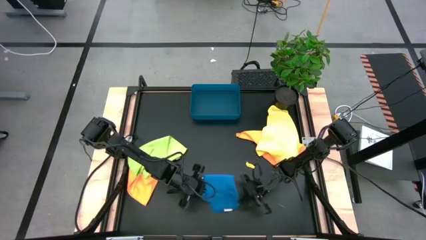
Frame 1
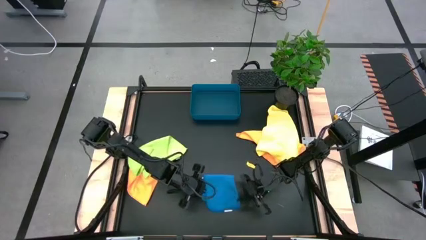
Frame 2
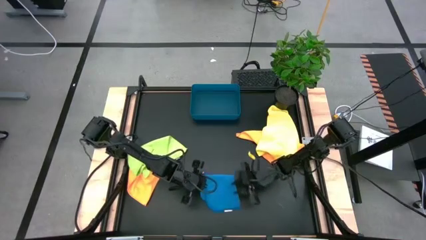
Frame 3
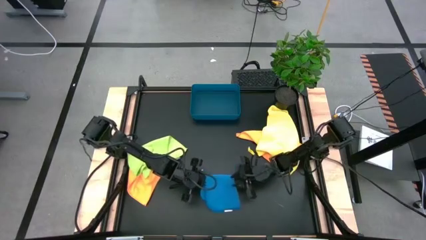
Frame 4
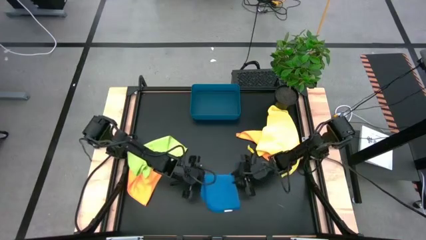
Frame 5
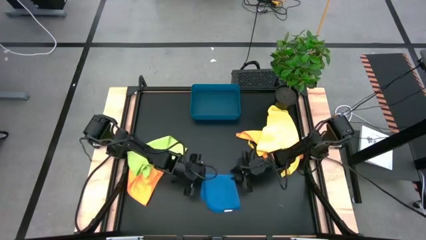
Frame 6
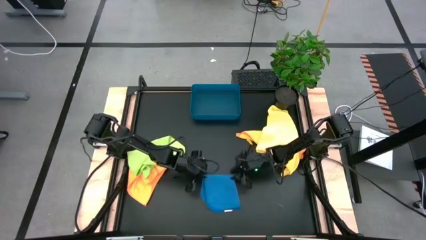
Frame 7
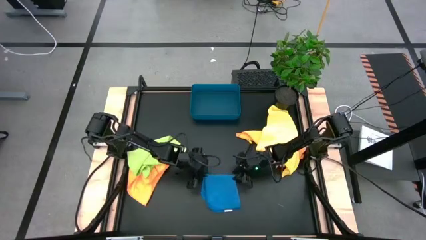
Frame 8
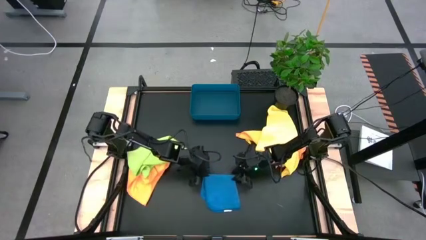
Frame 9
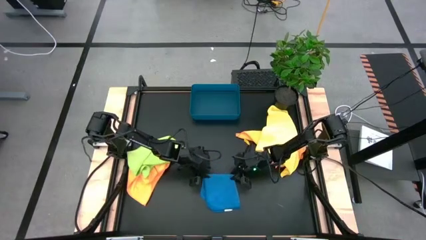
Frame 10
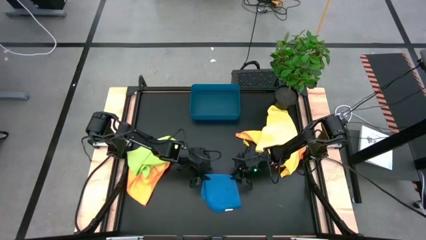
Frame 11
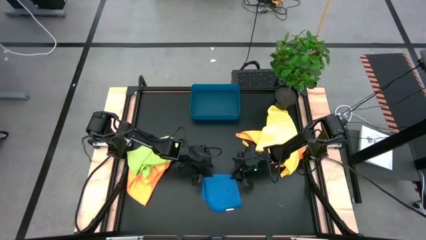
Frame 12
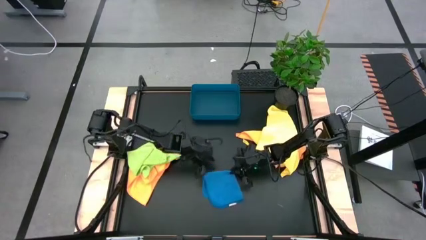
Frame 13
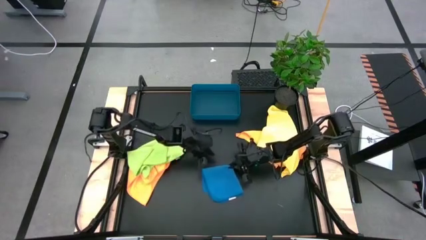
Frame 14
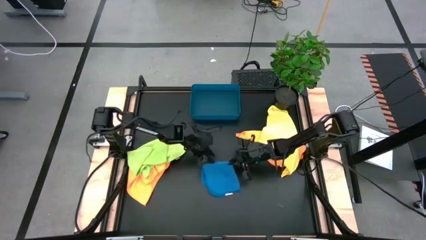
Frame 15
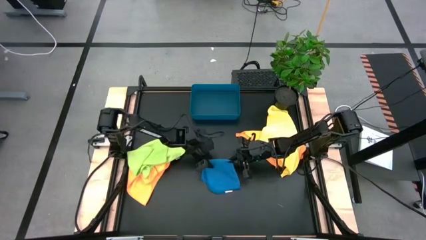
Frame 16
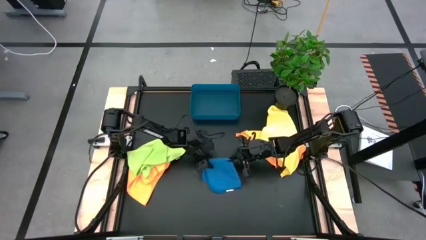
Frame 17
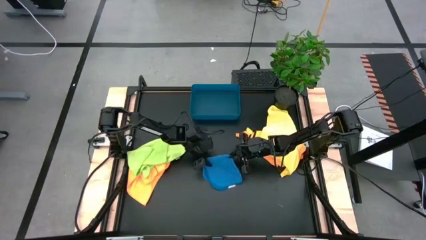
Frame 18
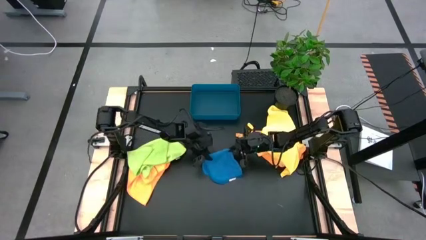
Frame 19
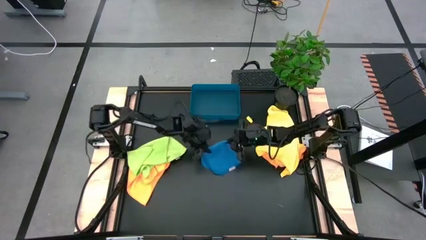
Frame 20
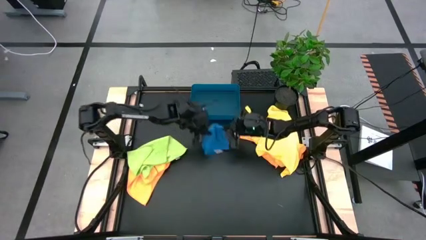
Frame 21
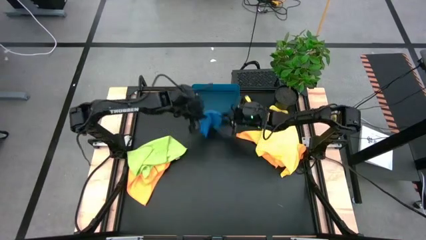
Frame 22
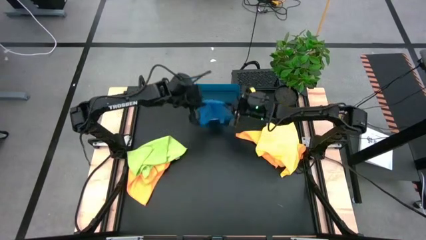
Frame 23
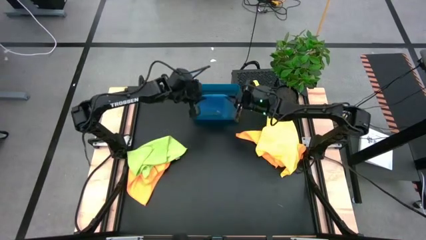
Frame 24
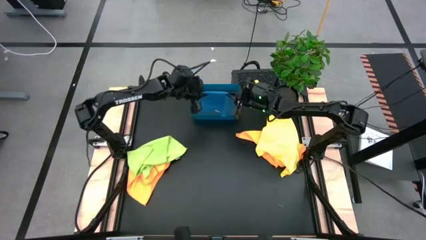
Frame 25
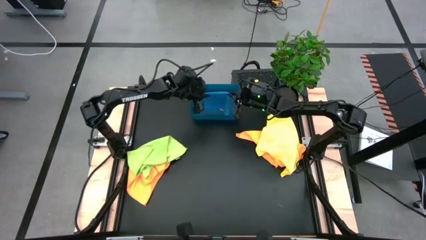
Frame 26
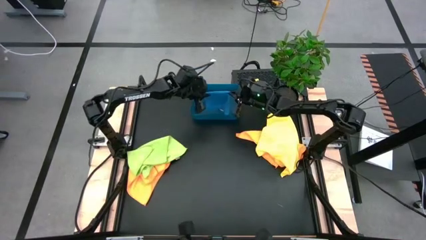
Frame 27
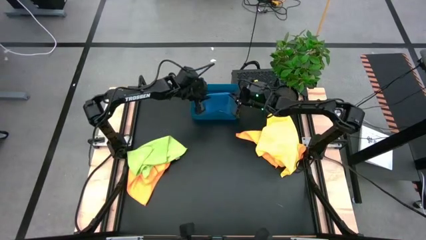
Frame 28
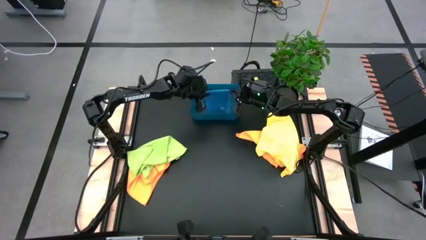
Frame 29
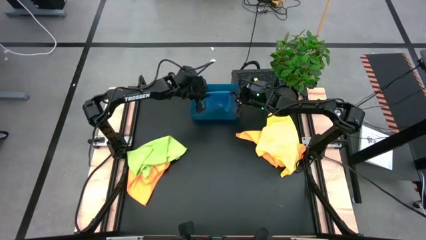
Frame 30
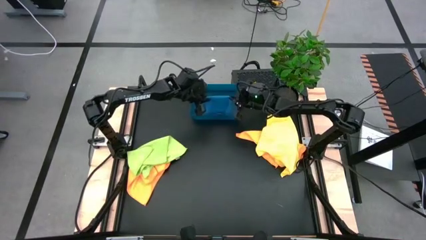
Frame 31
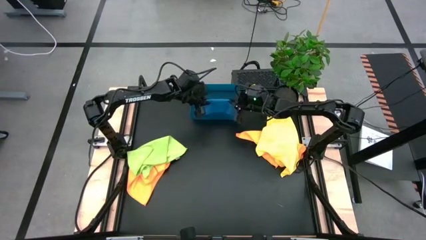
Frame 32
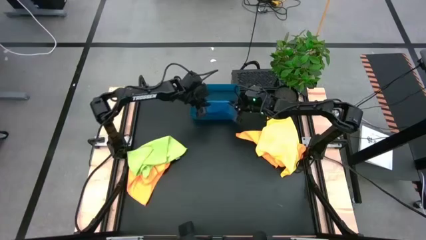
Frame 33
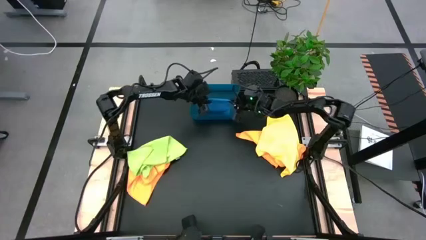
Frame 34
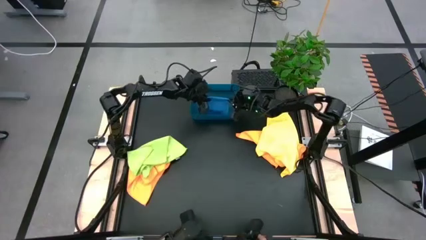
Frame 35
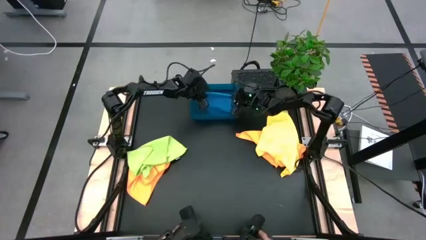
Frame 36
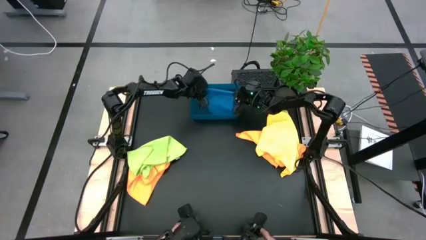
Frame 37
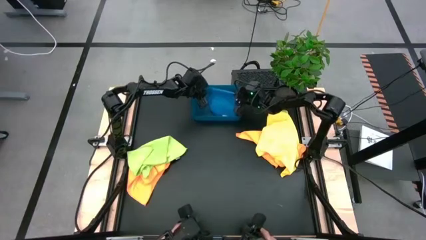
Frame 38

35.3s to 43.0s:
Task: Fold microfiber towels
Put the blue microfiber cloth into the blue bin

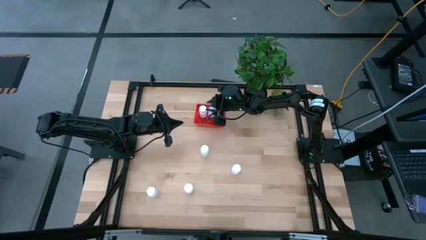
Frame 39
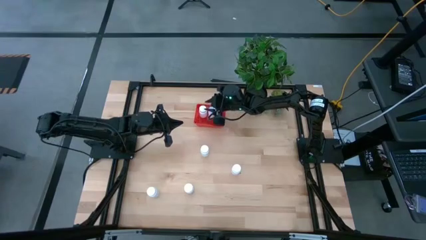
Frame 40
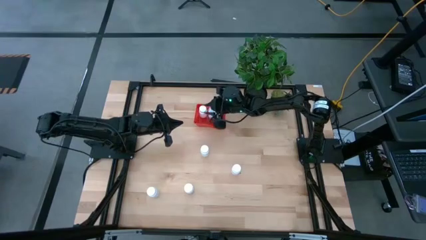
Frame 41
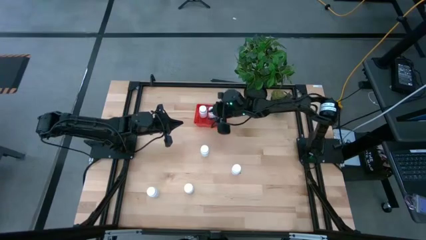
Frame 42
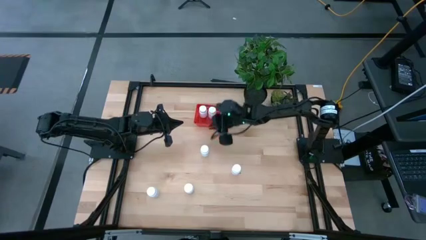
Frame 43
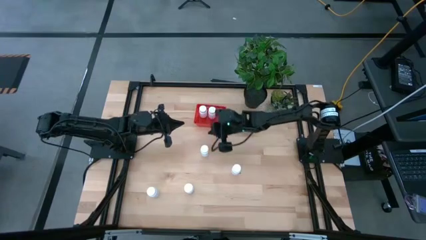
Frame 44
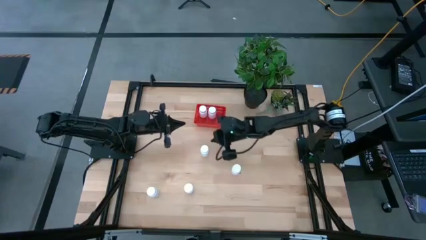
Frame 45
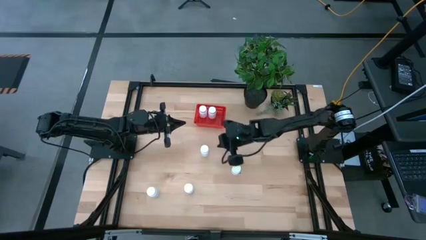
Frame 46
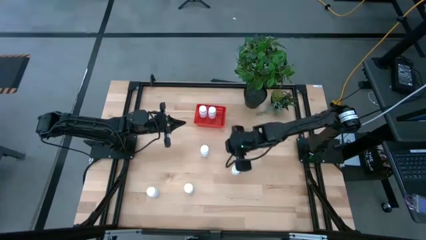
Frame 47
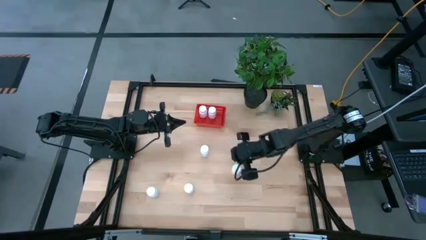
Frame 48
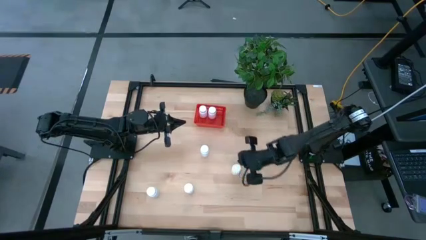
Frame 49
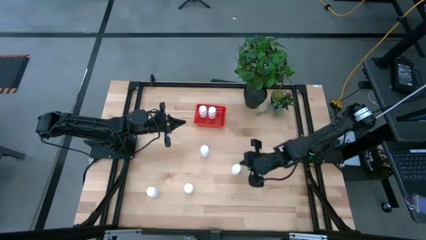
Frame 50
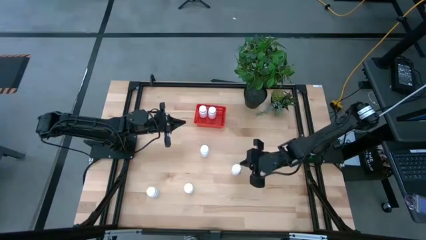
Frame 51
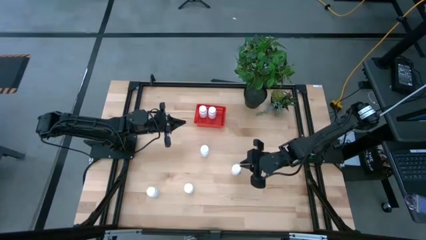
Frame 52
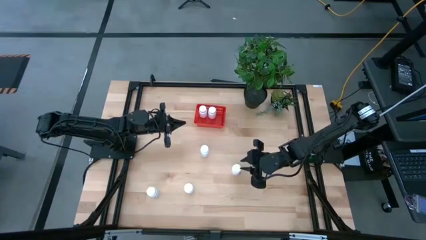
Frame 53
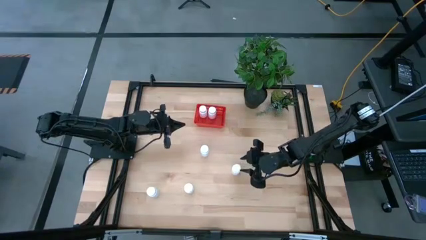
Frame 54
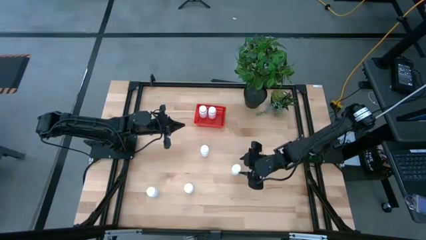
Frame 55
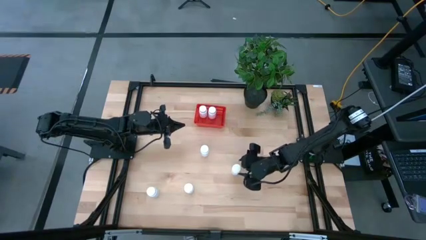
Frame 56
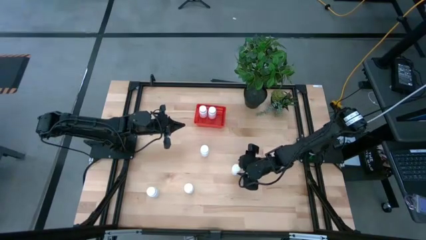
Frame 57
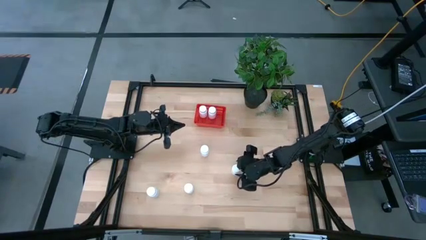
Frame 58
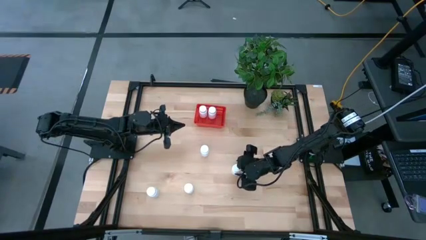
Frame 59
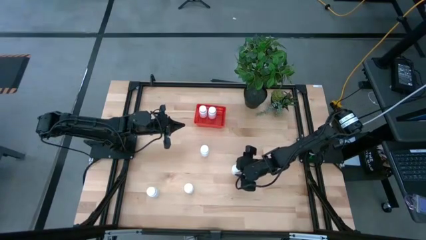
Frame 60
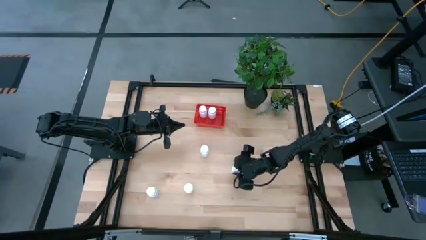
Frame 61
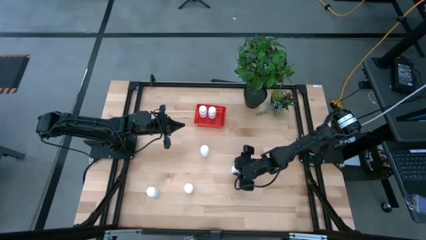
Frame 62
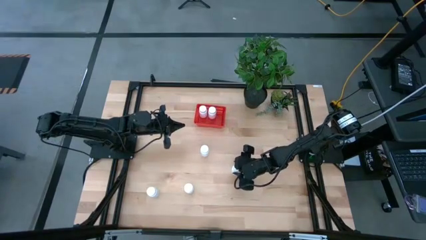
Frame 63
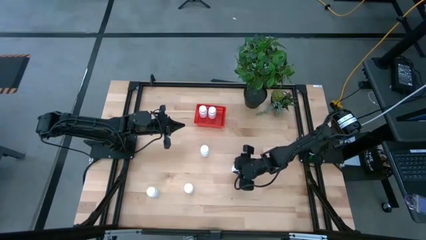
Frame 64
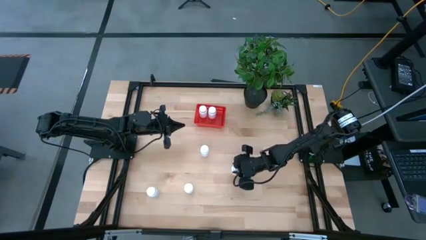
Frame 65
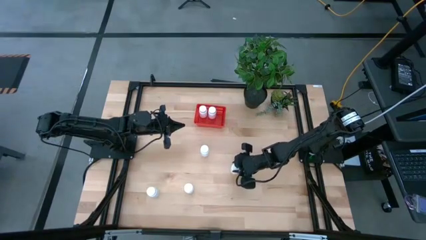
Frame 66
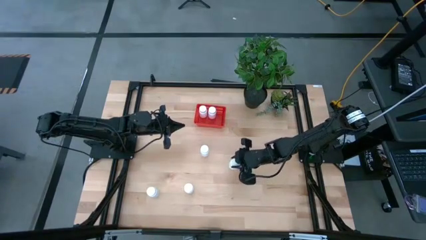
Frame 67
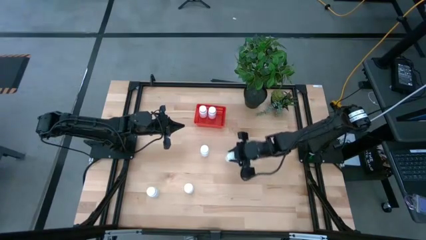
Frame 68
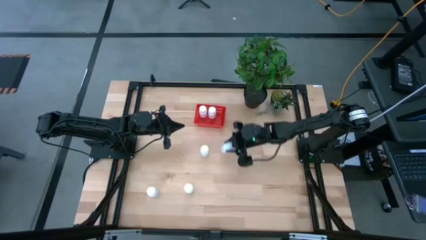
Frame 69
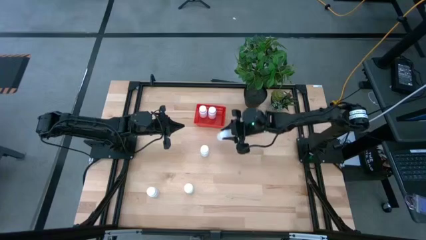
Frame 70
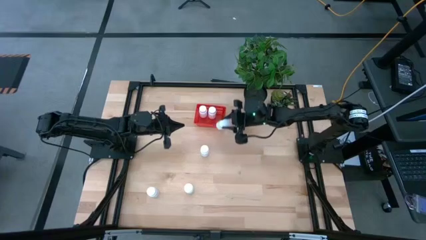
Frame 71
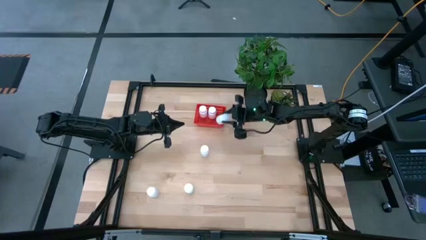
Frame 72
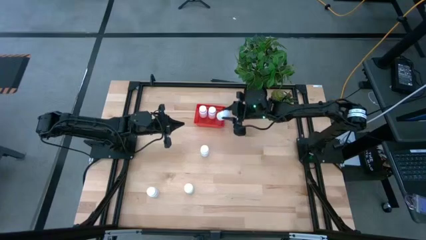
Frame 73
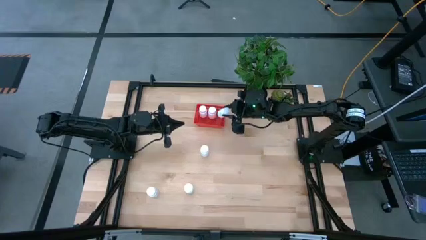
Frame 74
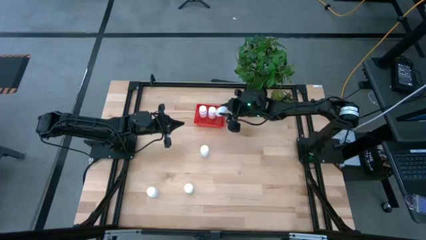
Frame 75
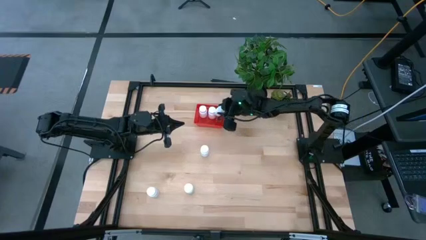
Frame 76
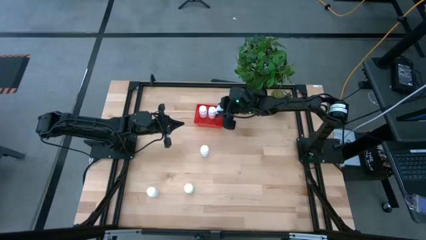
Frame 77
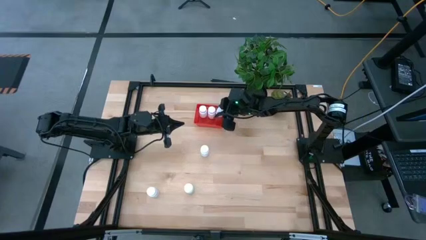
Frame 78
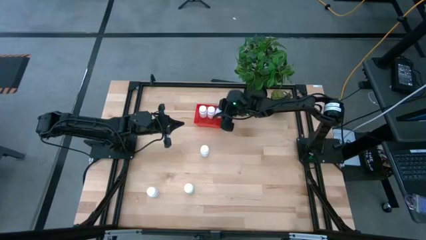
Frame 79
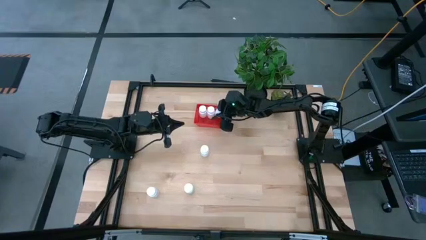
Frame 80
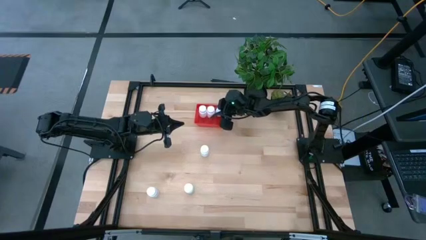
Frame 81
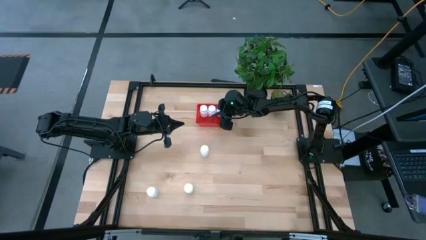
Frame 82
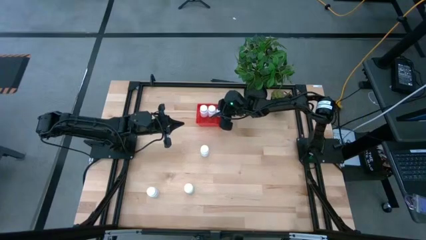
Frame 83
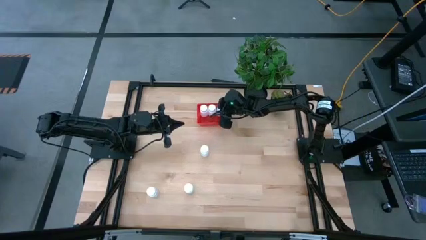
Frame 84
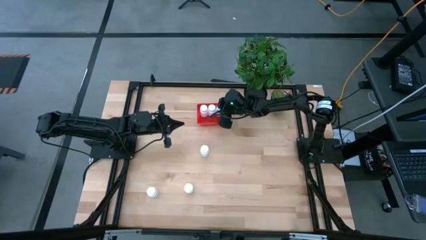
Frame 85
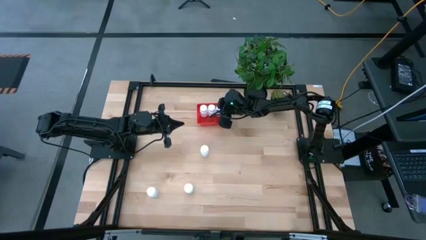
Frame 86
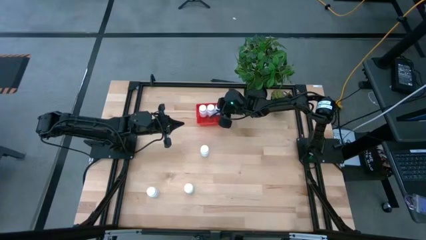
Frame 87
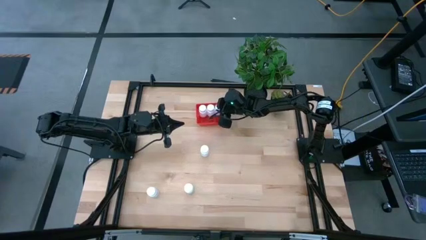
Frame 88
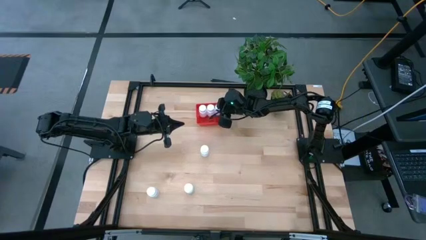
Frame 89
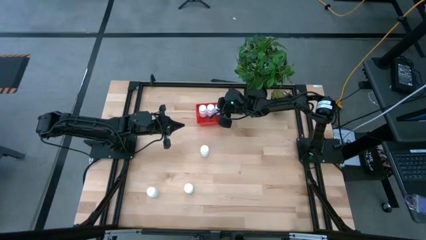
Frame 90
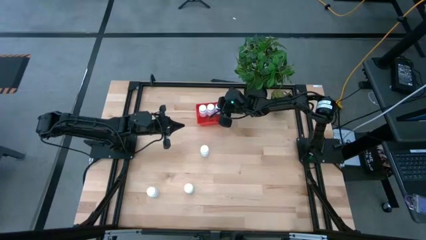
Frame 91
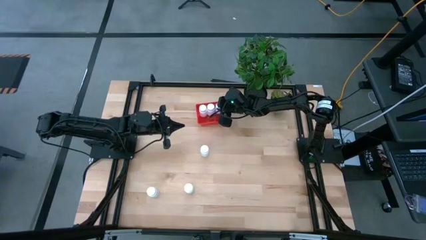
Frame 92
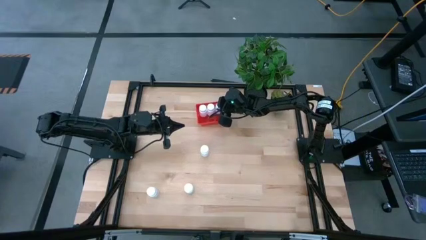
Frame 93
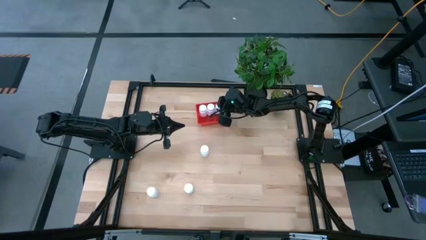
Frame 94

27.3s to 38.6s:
Task: Pick and place pill bottles into a basket
Put the white pill bottle into the red bin
